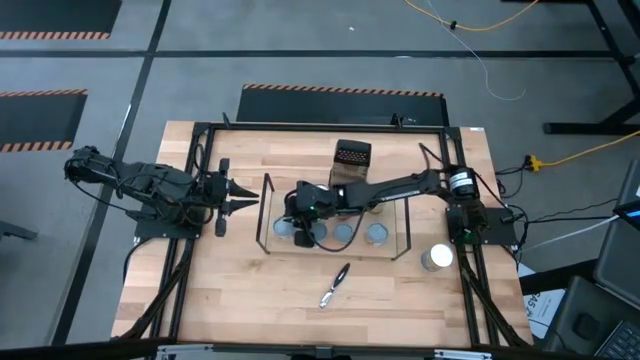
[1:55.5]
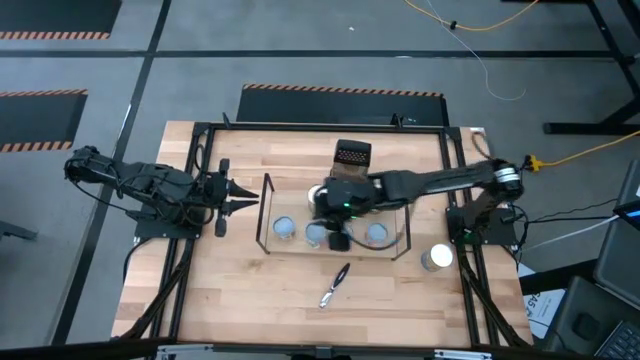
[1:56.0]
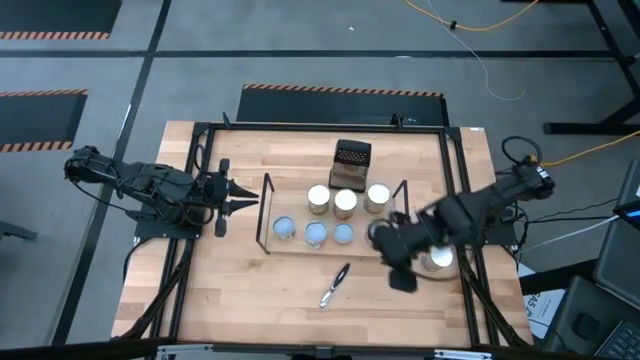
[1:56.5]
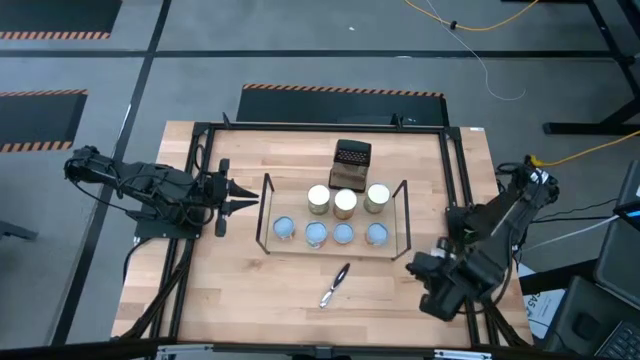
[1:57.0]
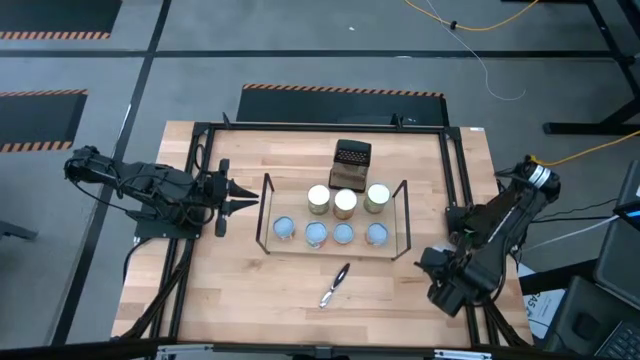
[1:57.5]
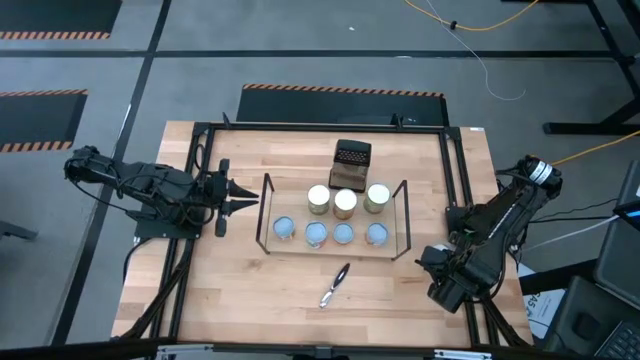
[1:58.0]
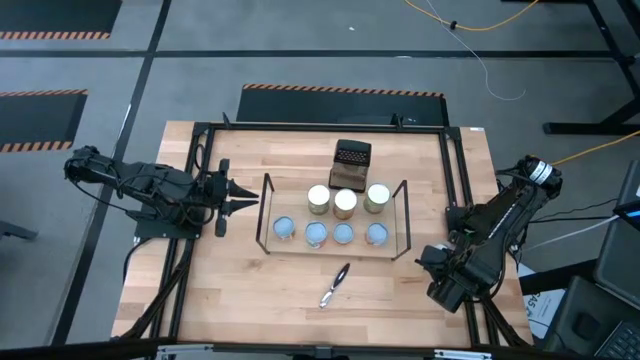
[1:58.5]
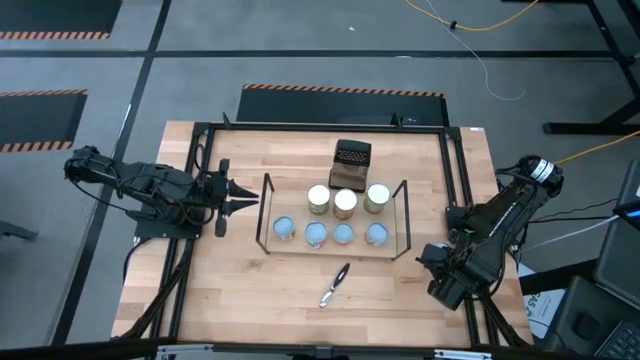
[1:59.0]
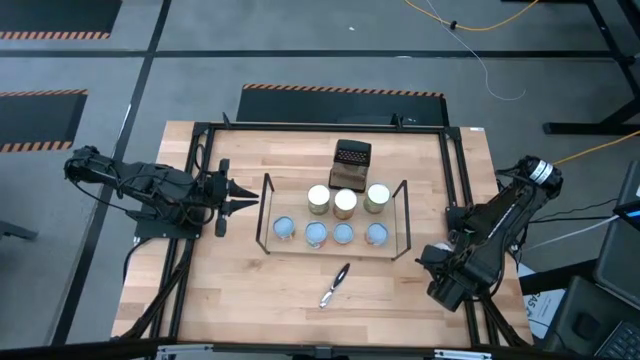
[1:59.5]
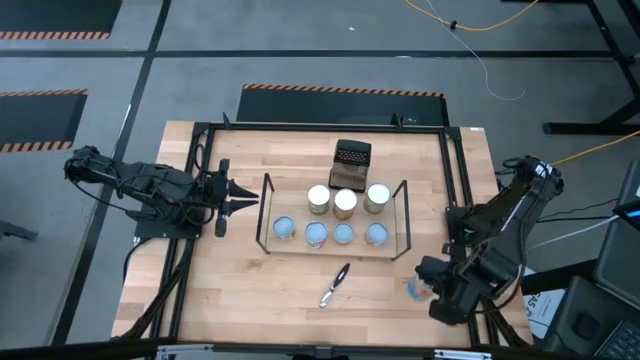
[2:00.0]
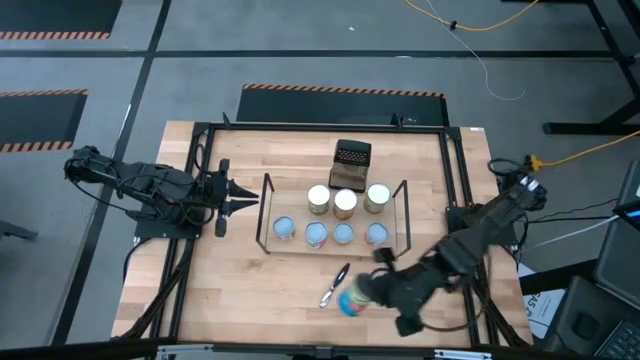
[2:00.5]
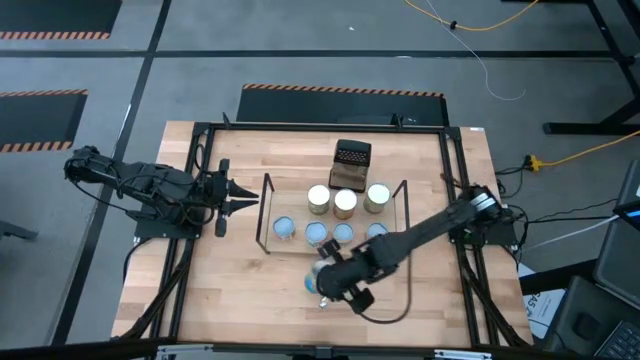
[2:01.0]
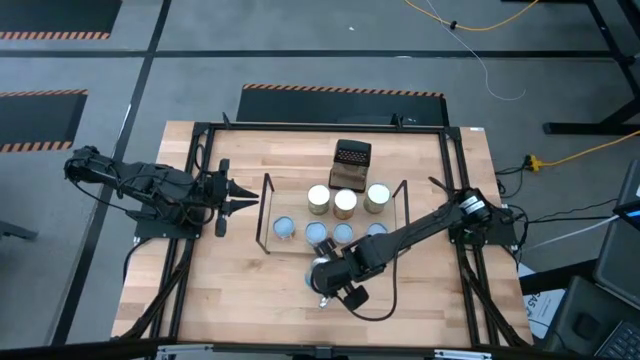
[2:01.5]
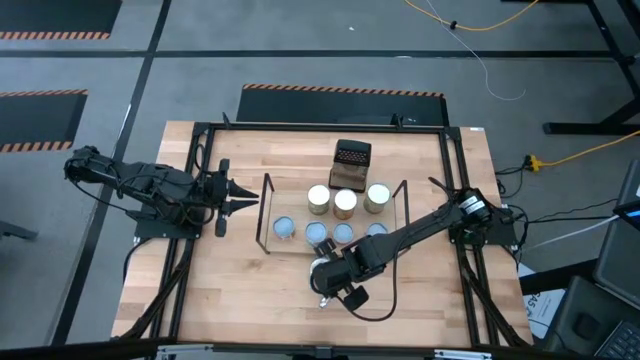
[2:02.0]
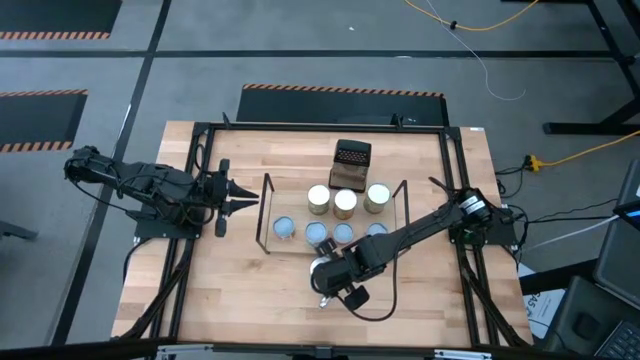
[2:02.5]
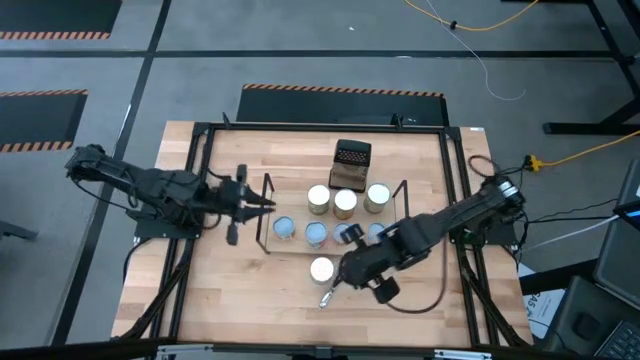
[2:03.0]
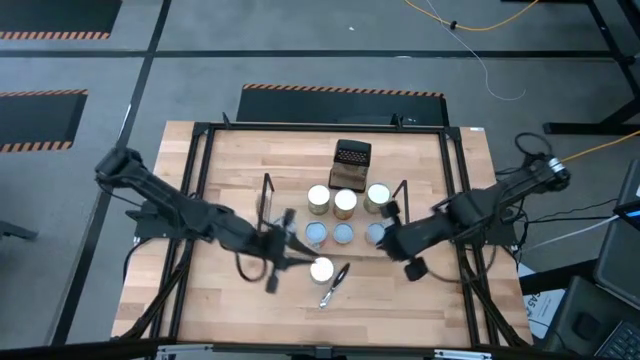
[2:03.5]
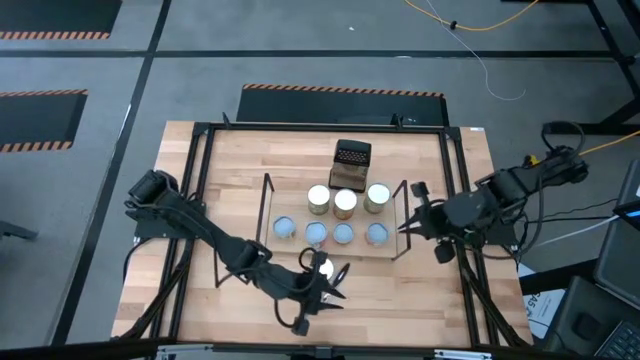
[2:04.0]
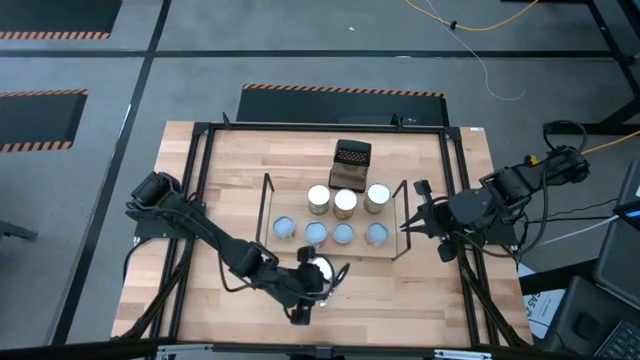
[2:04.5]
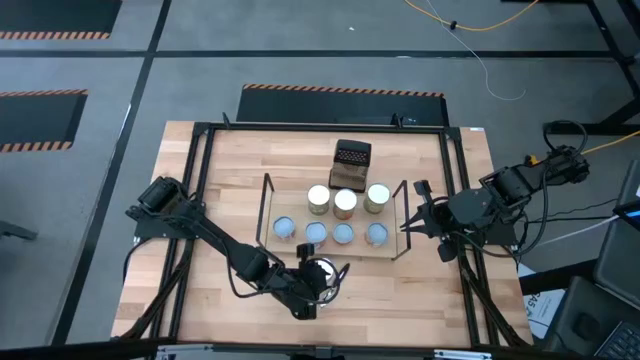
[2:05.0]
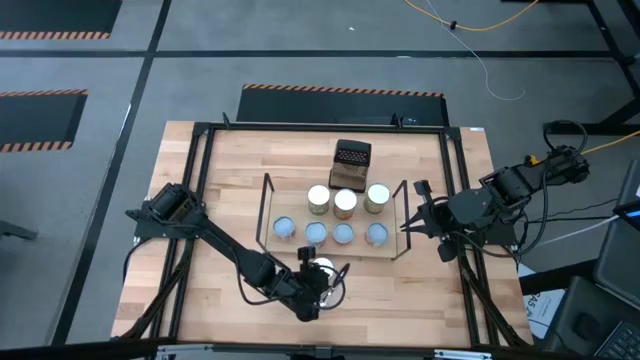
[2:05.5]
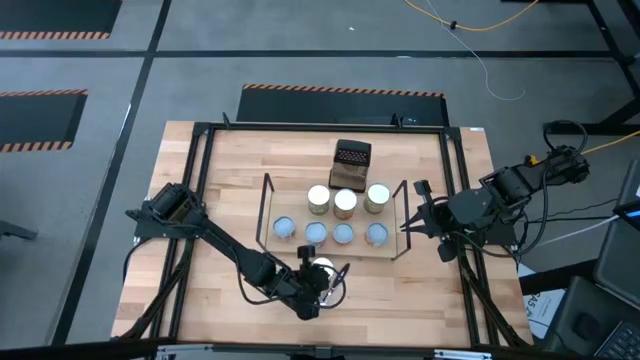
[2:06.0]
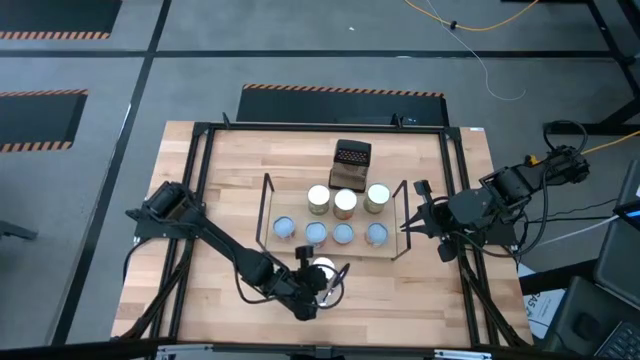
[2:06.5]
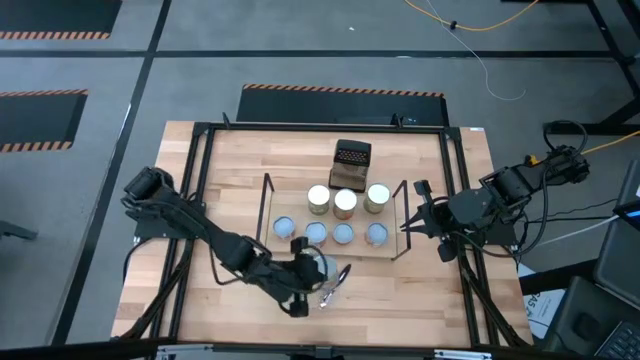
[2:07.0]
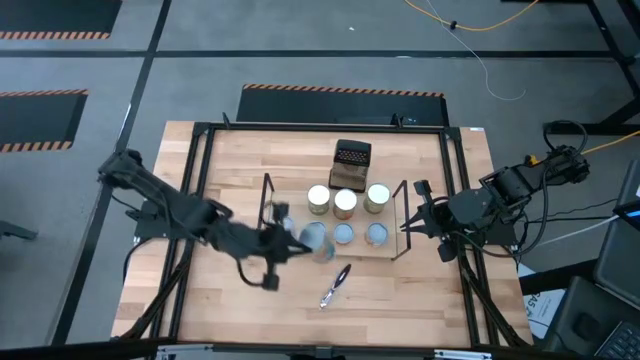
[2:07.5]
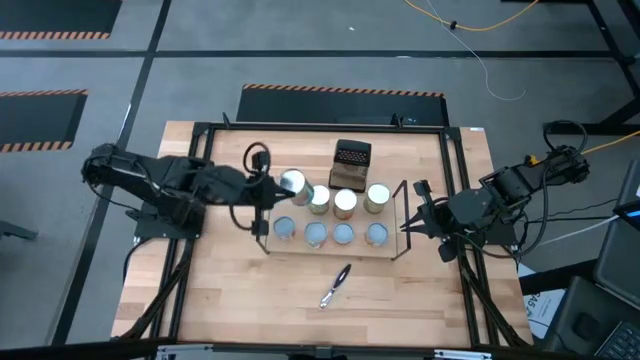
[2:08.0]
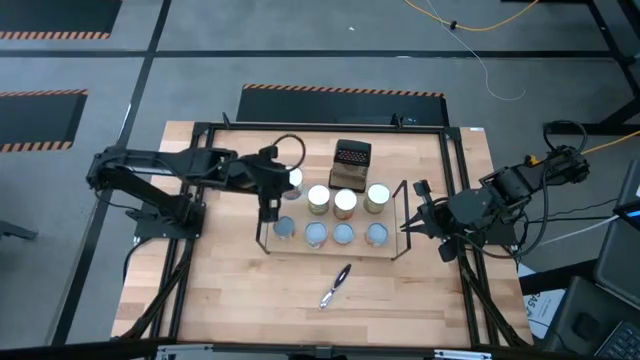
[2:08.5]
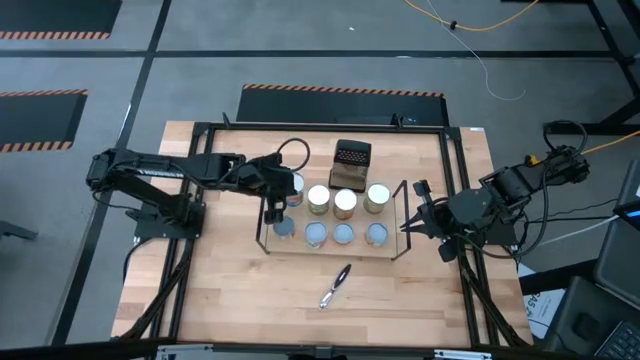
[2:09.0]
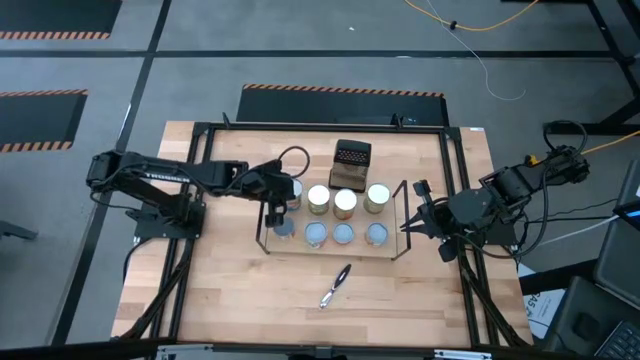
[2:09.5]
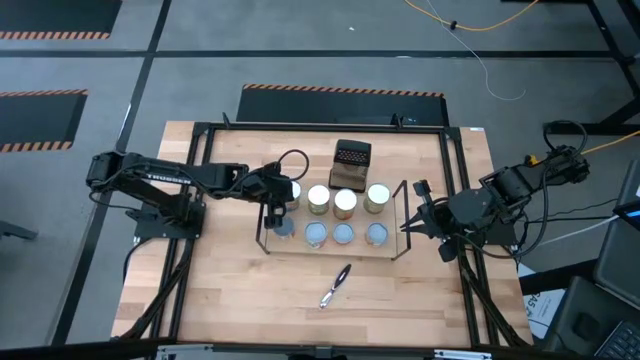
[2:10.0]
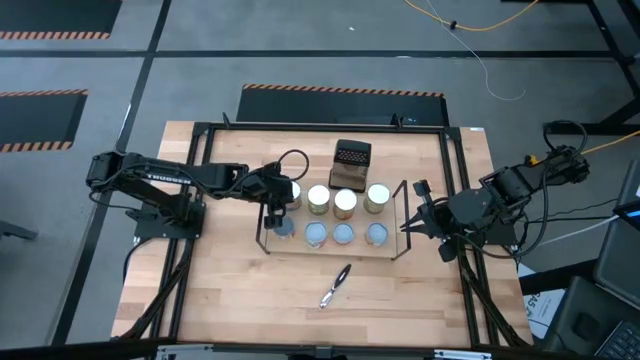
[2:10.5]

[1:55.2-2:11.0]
Task: Pick and place cans onto a shelf
Put the canned tomatoes on the shelf

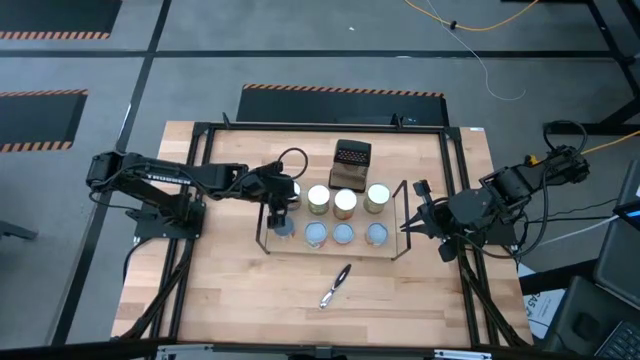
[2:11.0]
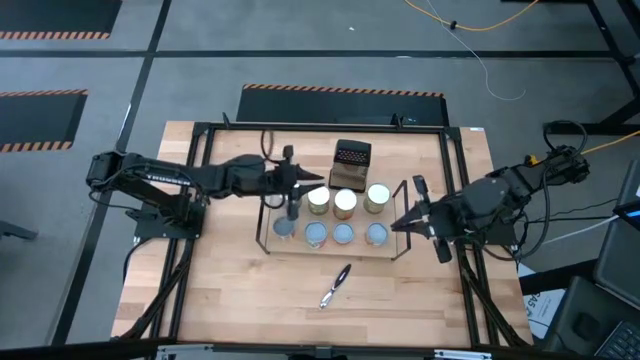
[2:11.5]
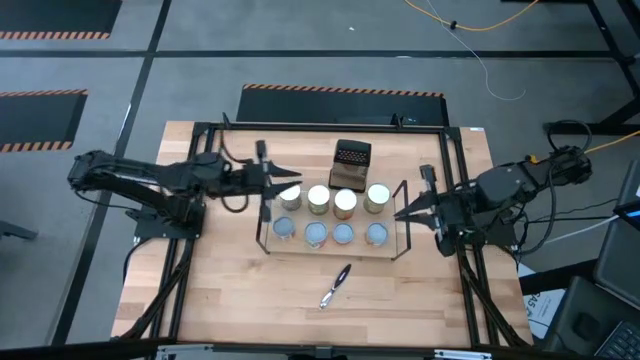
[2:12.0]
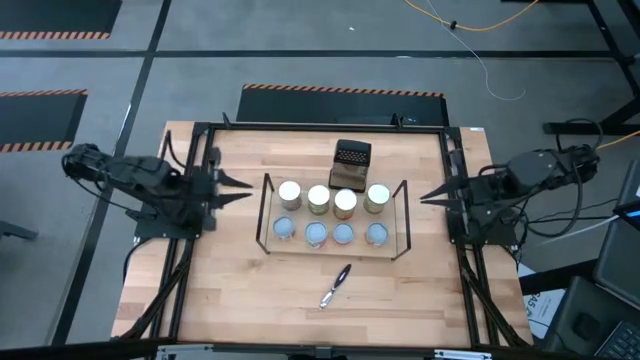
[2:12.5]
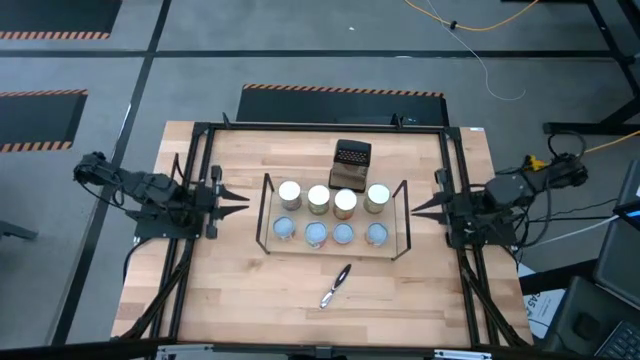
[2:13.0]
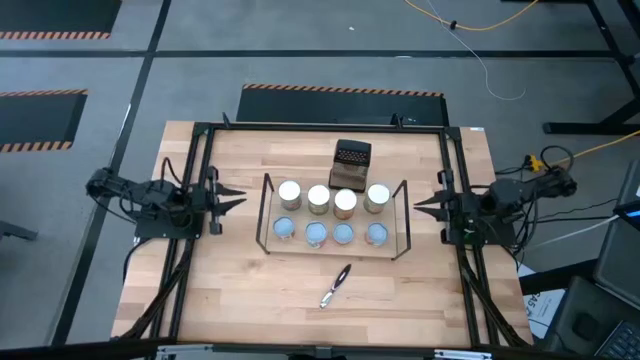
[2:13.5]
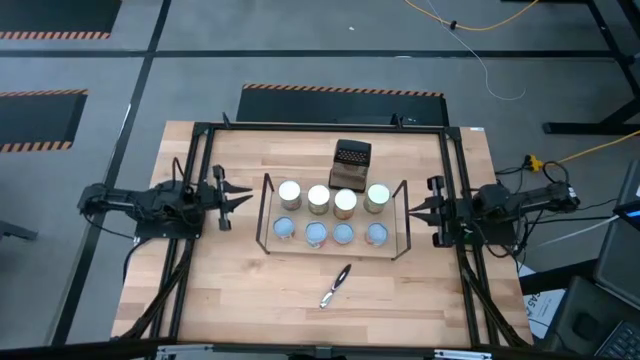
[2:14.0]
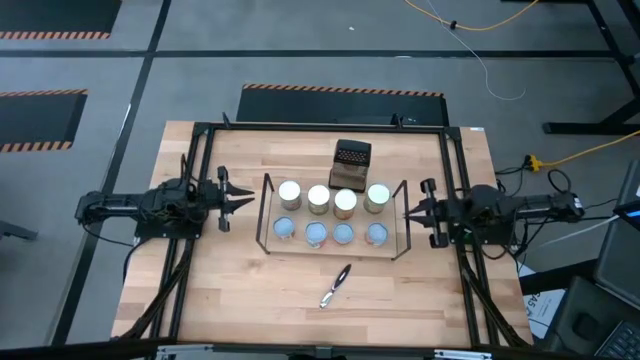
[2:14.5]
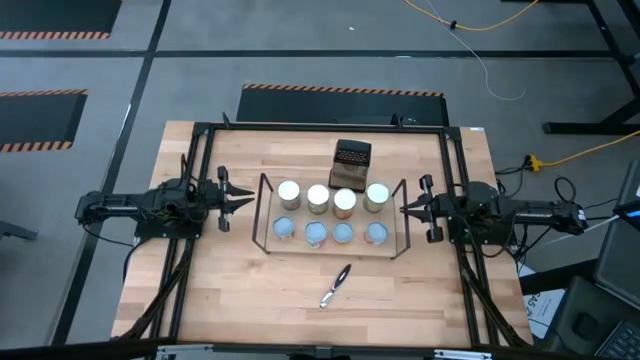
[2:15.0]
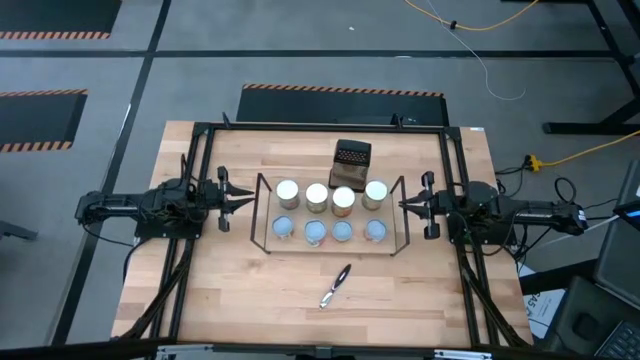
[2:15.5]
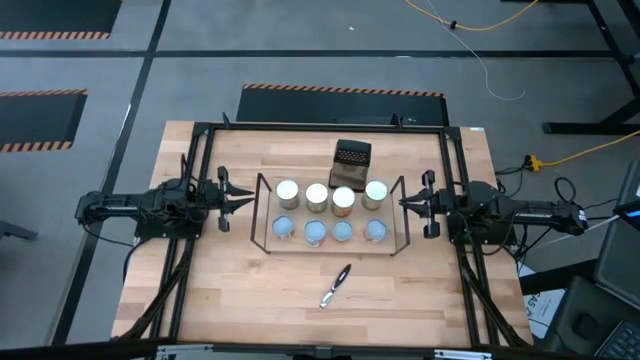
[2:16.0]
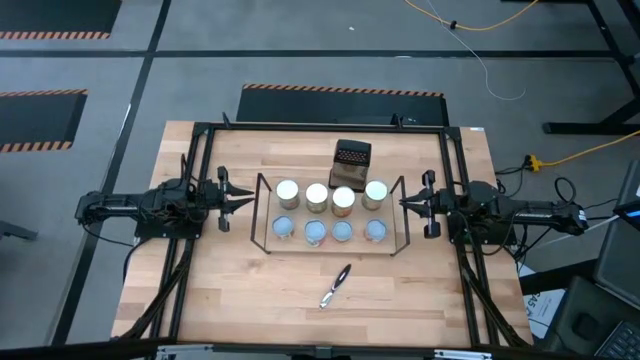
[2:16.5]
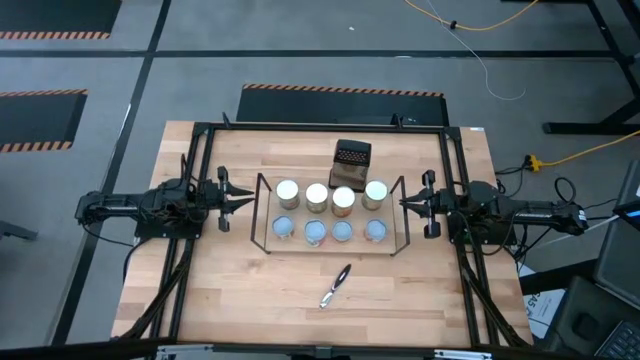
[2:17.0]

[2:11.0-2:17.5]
Return to Home Position
